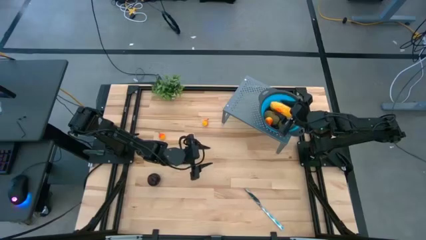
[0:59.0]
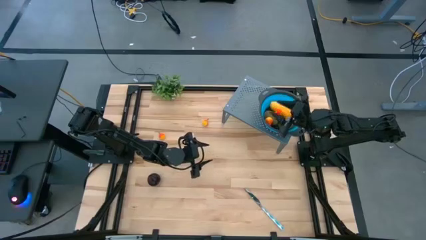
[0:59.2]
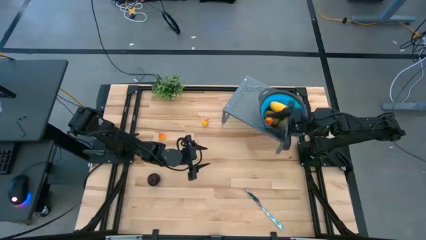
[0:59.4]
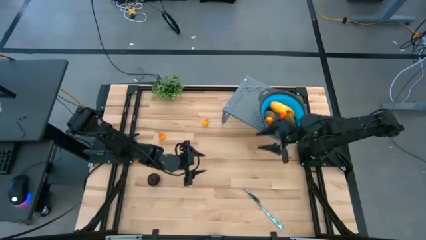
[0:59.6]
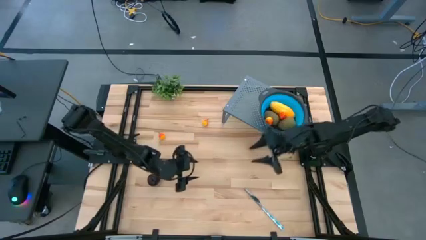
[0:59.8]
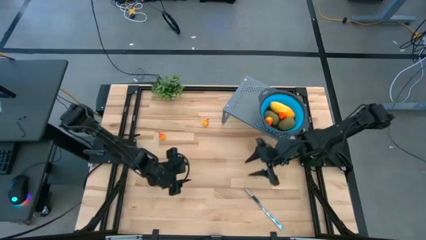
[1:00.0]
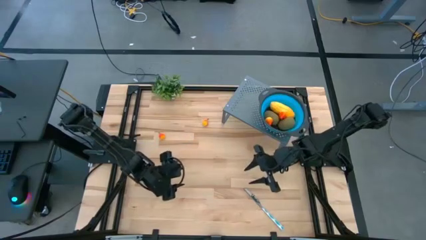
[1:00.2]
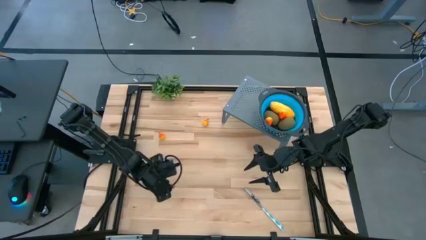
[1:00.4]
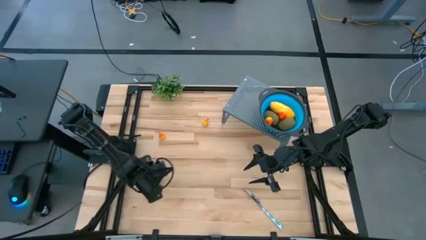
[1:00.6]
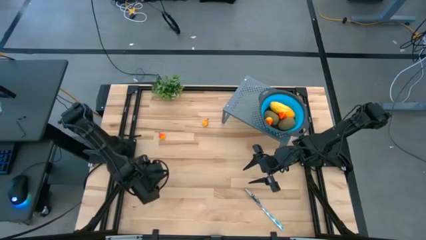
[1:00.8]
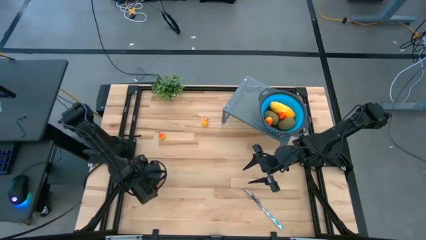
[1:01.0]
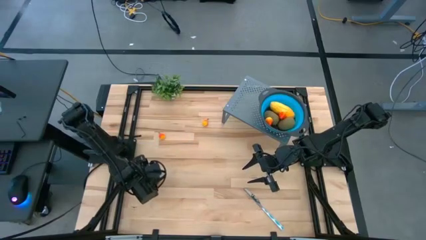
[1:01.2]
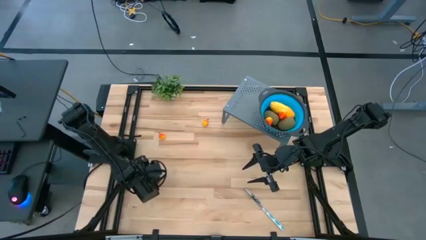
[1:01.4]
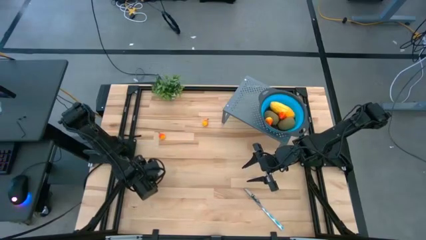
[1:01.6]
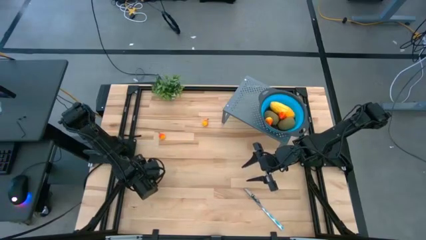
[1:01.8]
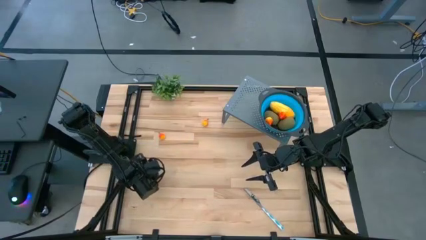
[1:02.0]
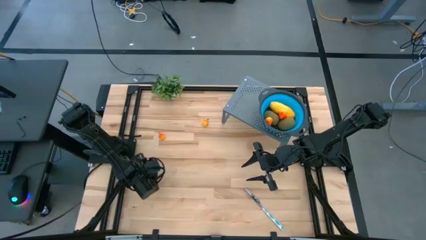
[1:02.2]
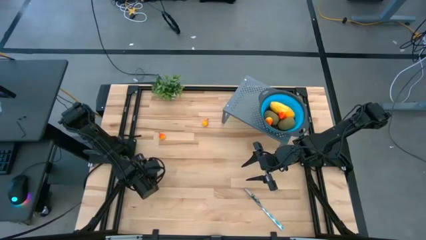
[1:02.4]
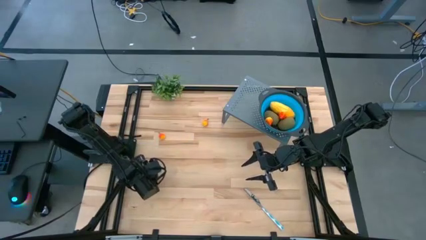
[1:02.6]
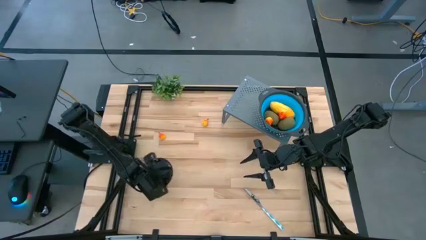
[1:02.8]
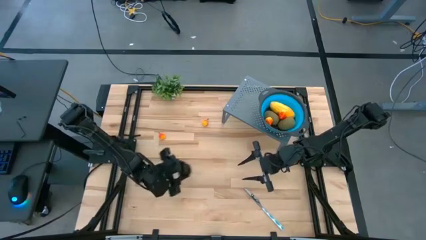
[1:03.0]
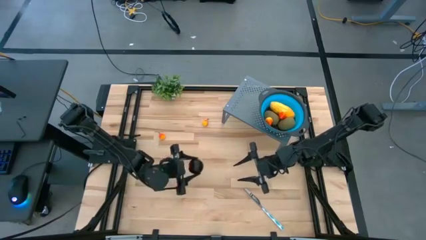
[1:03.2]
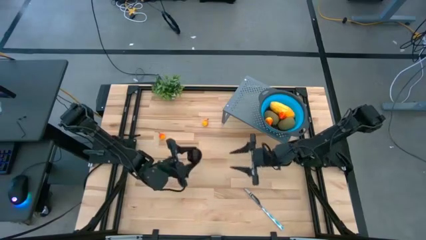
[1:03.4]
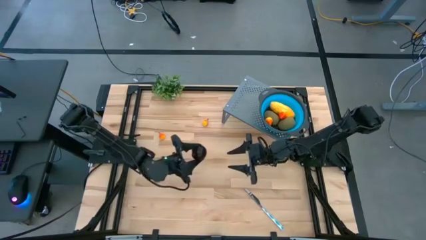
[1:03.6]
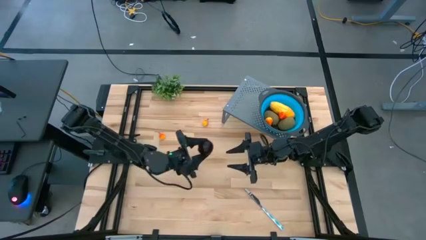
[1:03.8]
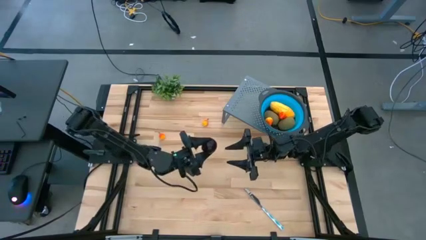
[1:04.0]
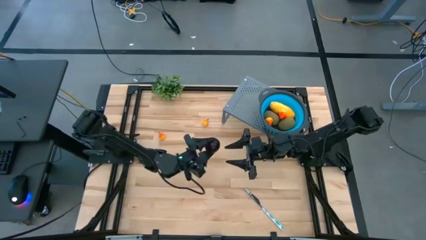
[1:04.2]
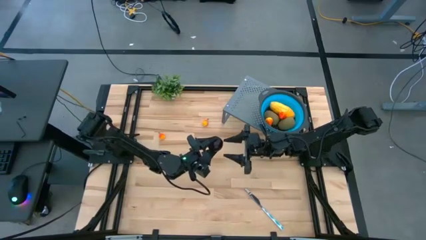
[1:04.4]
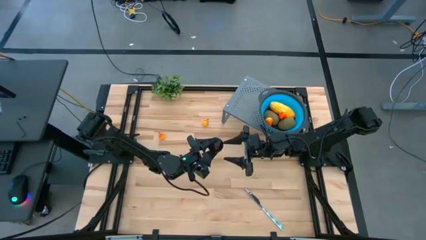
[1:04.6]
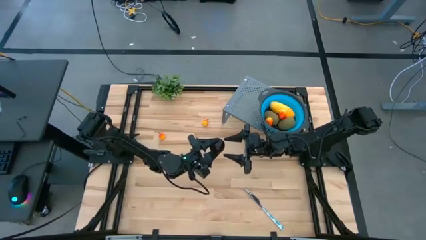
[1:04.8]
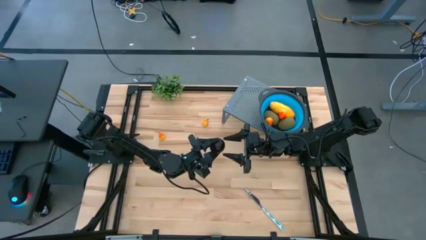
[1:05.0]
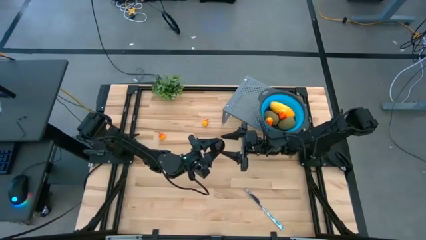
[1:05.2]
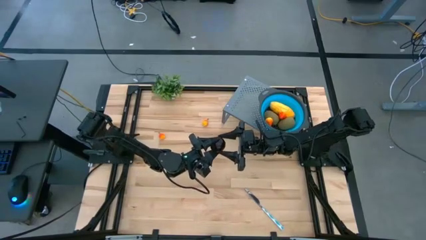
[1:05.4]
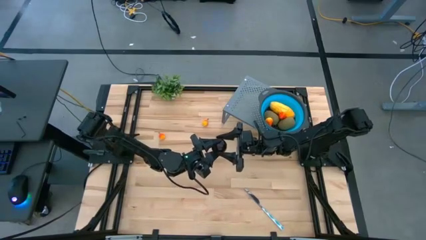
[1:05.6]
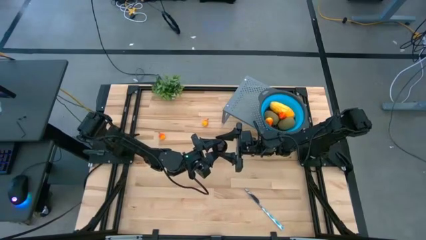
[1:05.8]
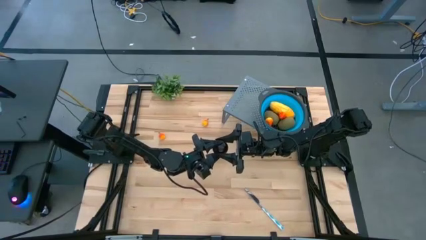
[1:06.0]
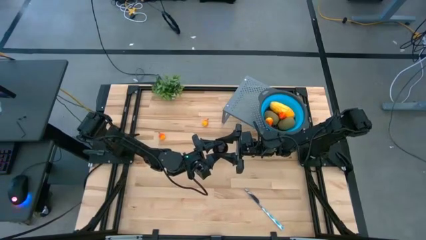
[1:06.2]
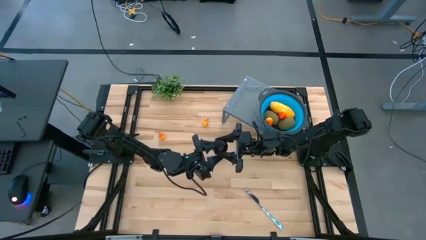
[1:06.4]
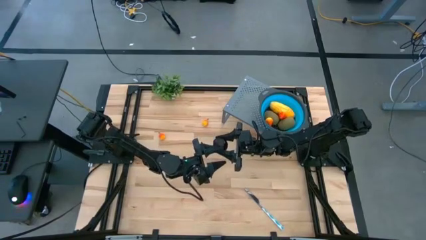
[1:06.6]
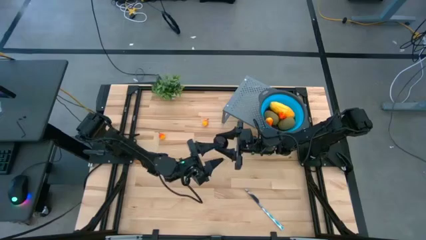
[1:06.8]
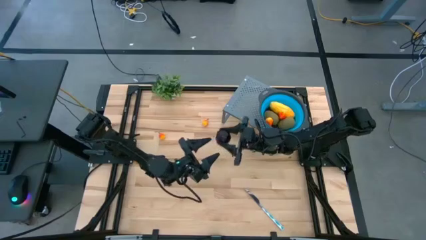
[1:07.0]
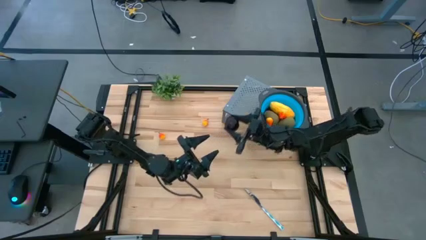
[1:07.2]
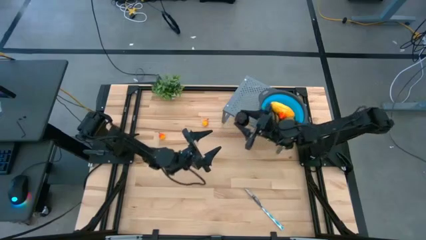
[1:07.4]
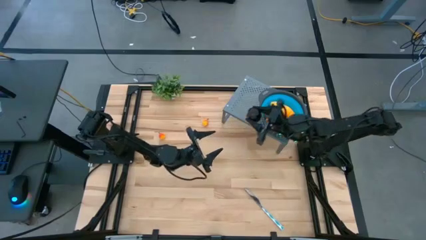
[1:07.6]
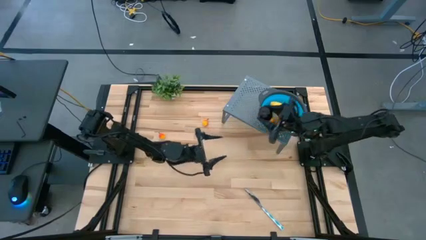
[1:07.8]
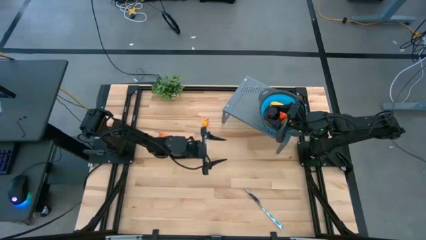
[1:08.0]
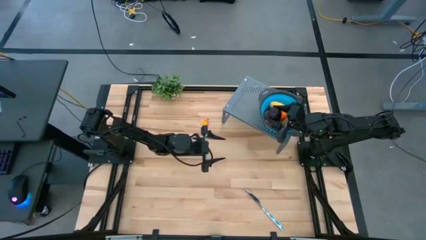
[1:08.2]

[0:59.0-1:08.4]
Task: Pick & Place Fruit
Put the plum into the strainer bowl on the shelf
